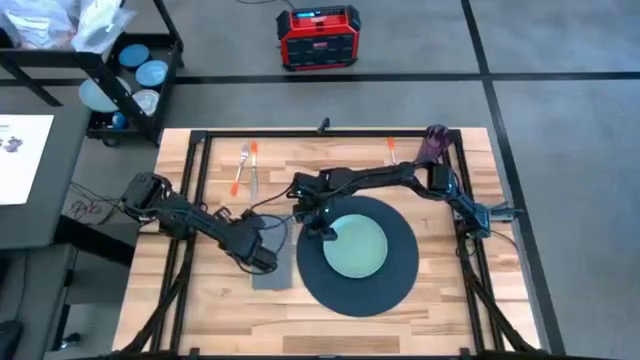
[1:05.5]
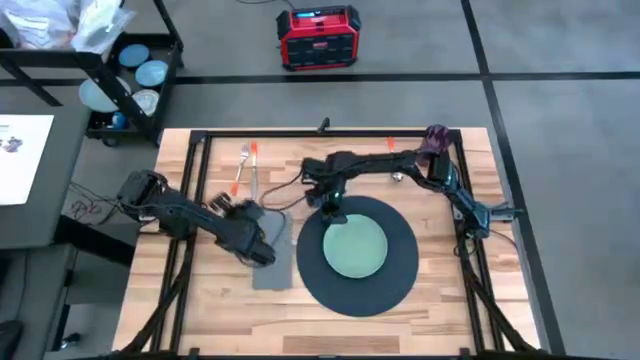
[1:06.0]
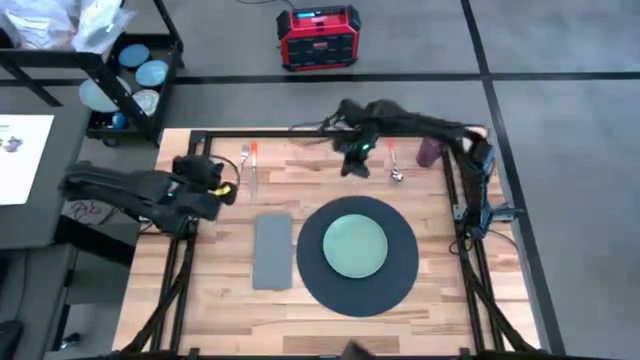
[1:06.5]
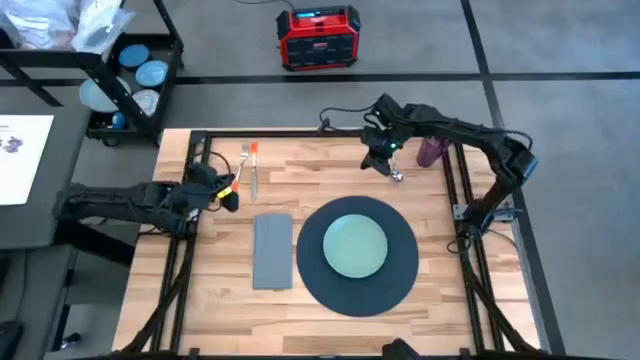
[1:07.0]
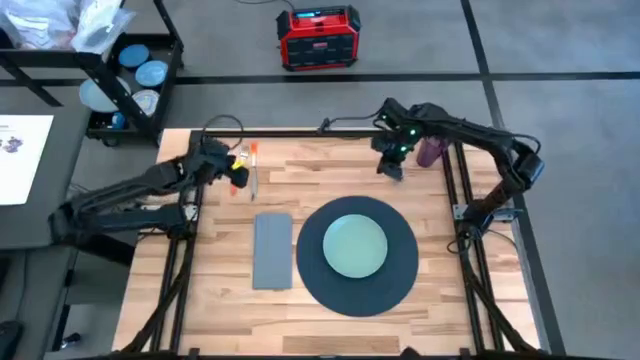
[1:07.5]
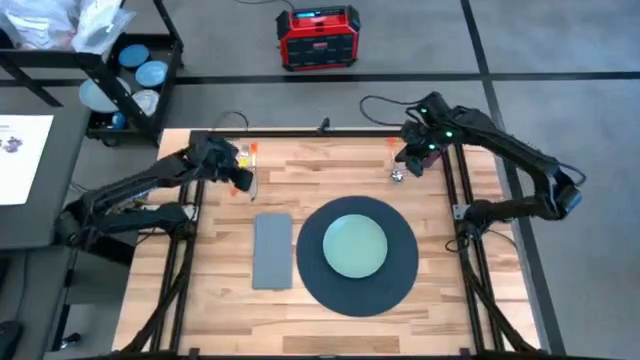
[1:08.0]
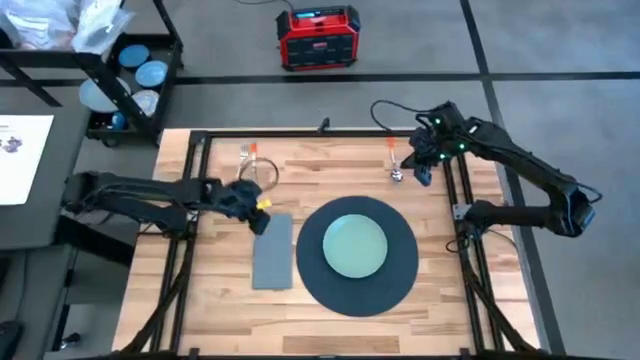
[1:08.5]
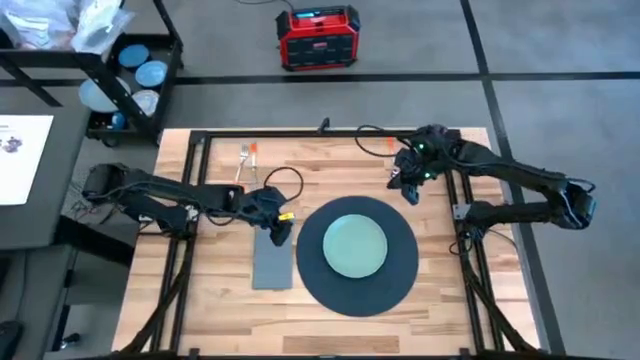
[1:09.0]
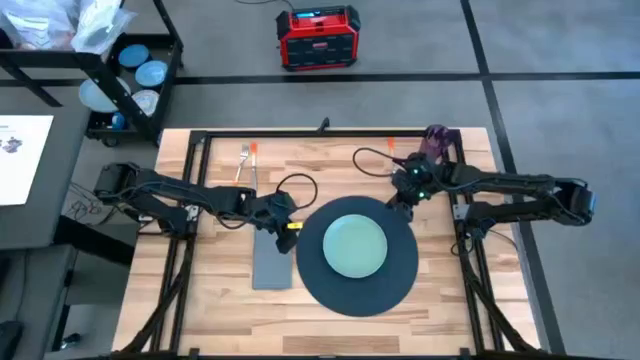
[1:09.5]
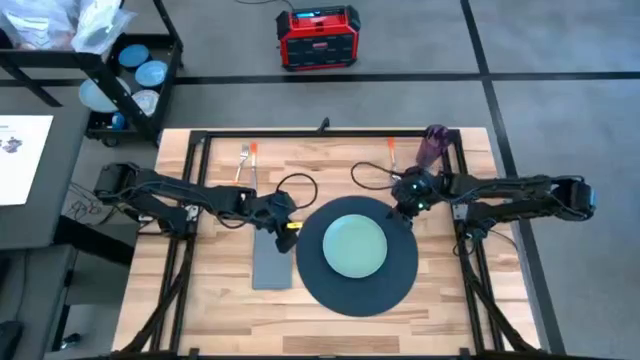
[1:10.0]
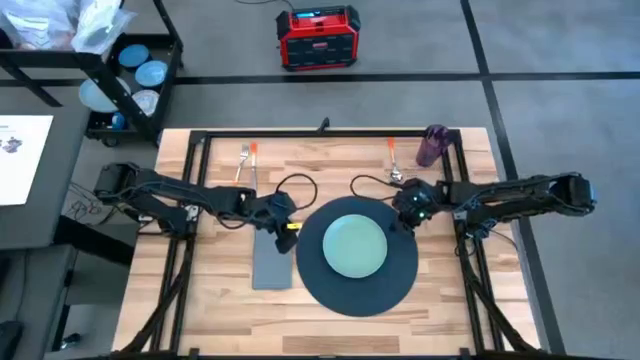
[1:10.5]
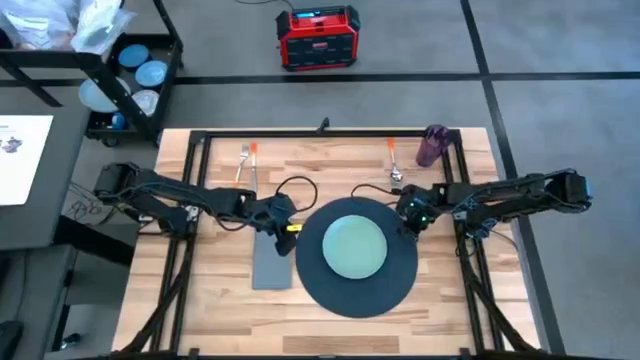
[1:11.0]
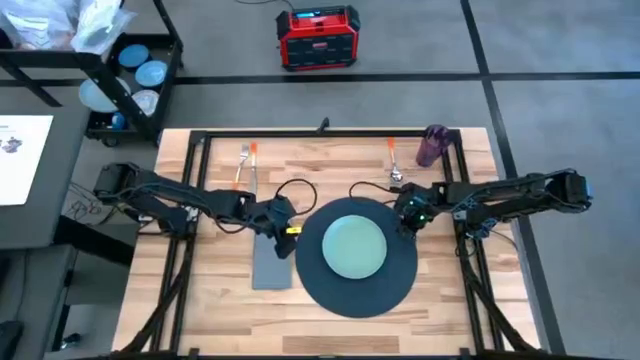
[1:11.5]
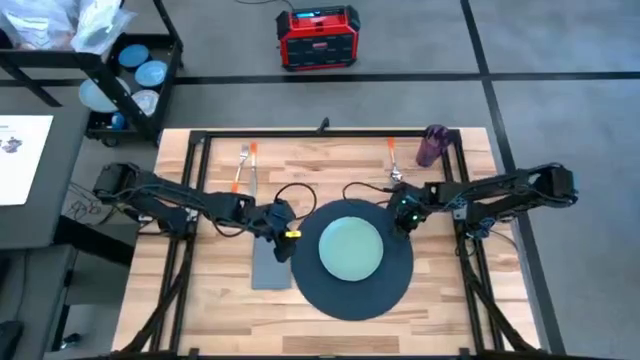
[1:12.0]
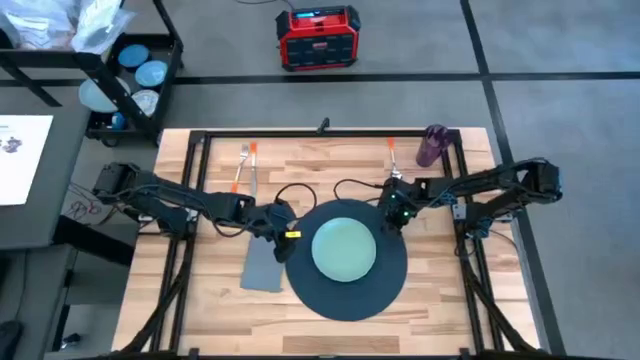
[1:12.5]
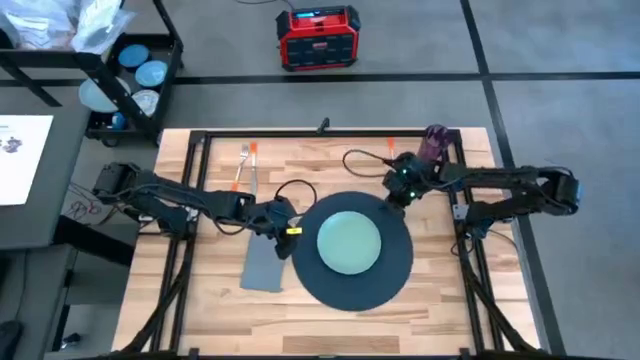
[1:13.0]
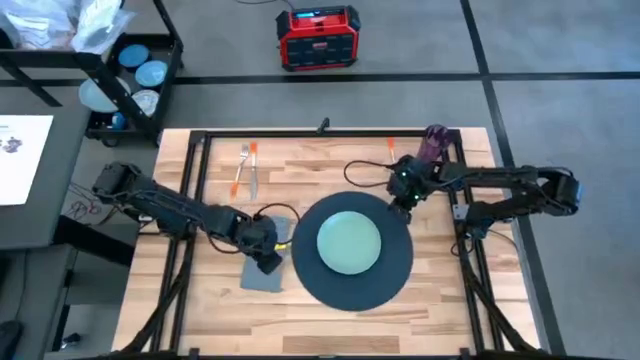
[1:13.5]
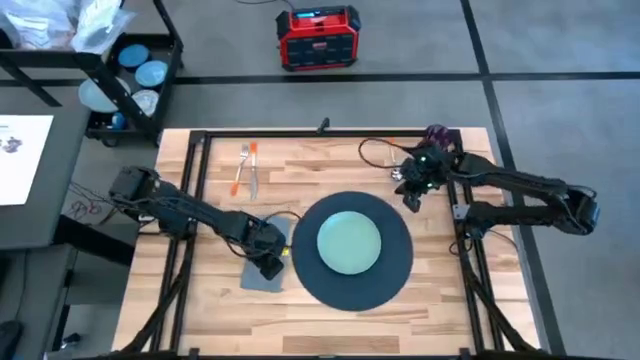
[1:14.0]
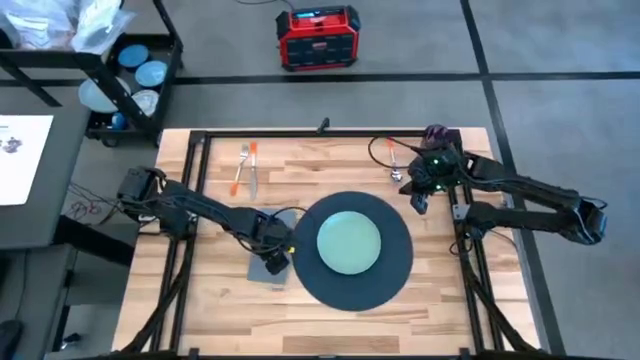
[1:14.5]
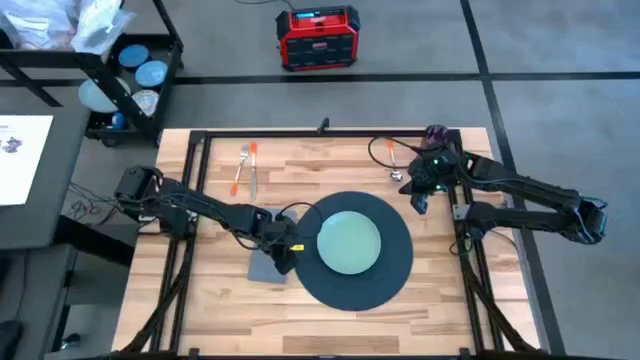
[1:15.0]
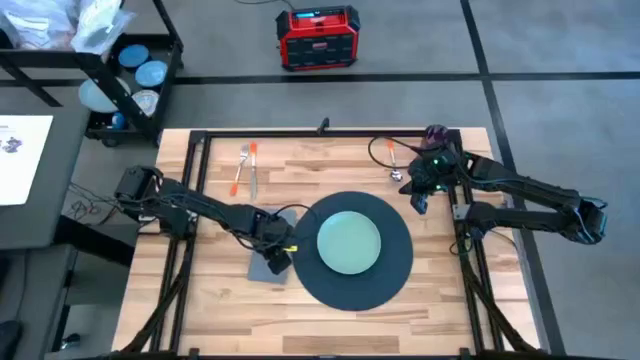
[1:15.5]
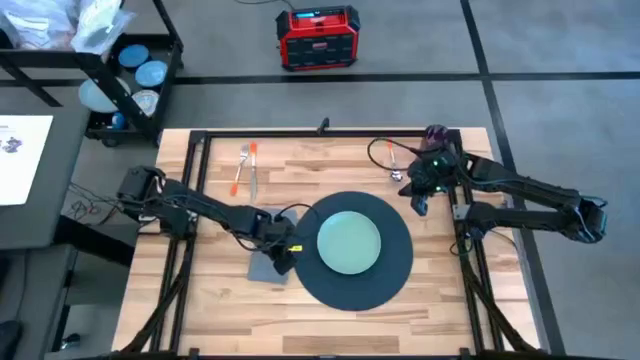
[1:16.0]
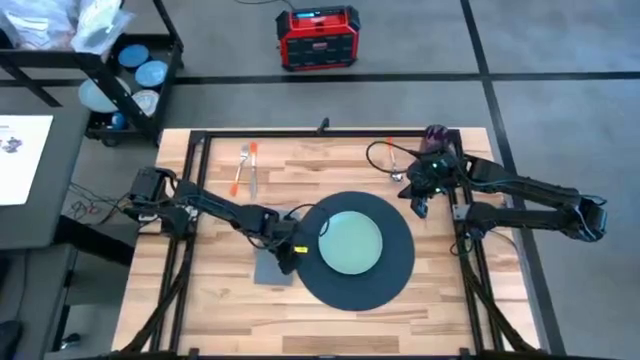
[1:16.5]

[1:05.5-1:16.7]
Task: Set table place
Adjust the gray napkin and blue placemat to the center

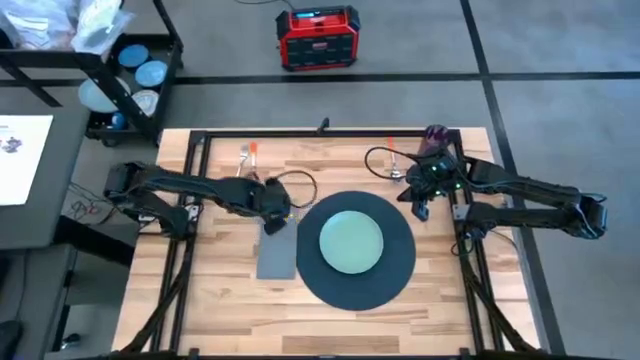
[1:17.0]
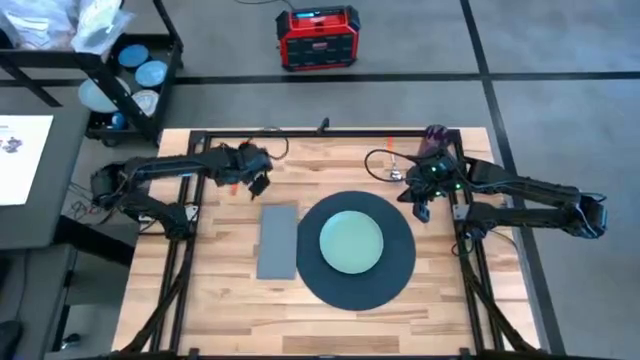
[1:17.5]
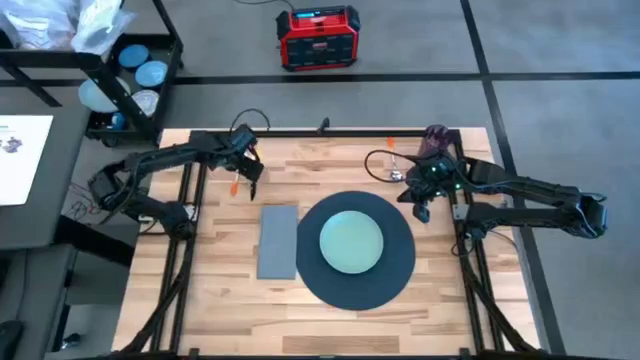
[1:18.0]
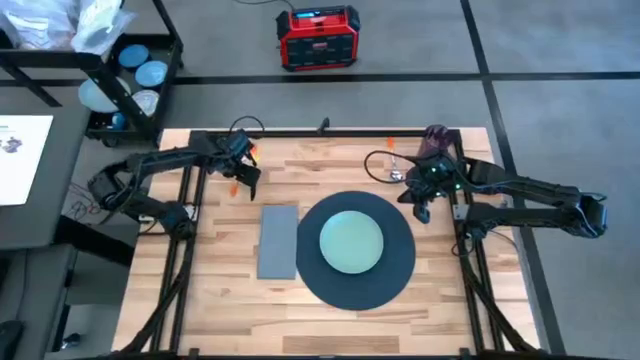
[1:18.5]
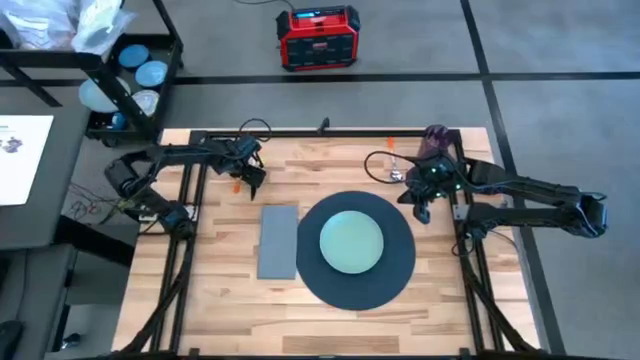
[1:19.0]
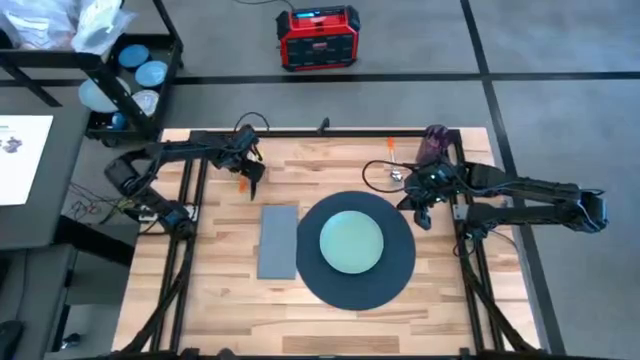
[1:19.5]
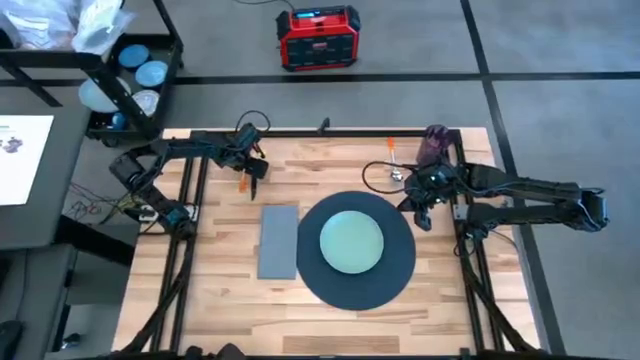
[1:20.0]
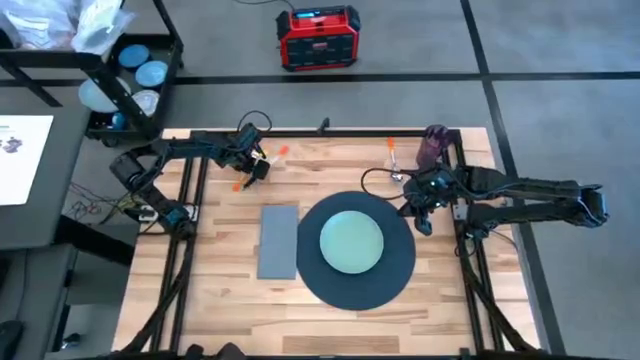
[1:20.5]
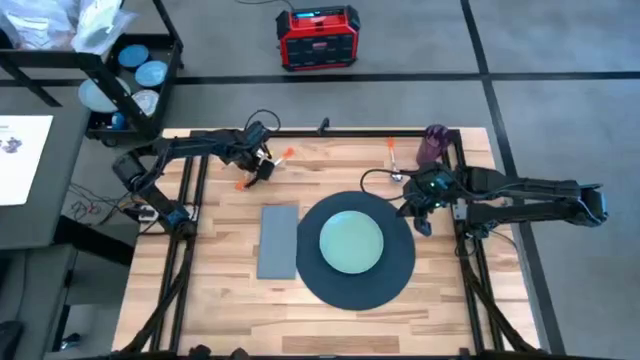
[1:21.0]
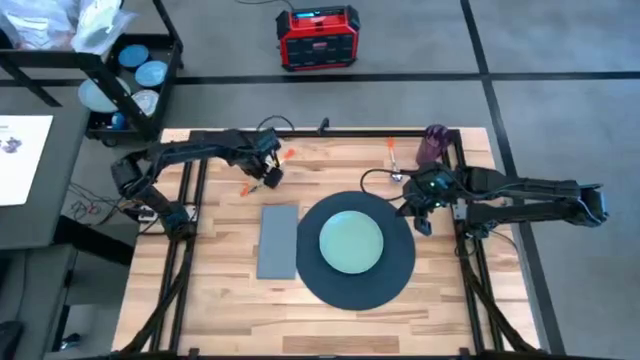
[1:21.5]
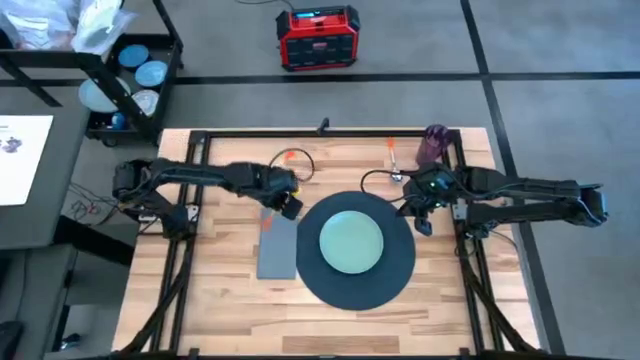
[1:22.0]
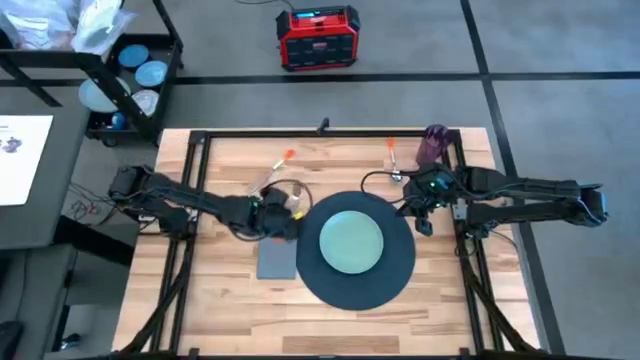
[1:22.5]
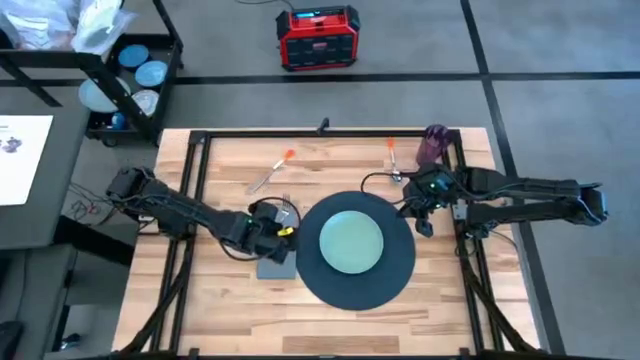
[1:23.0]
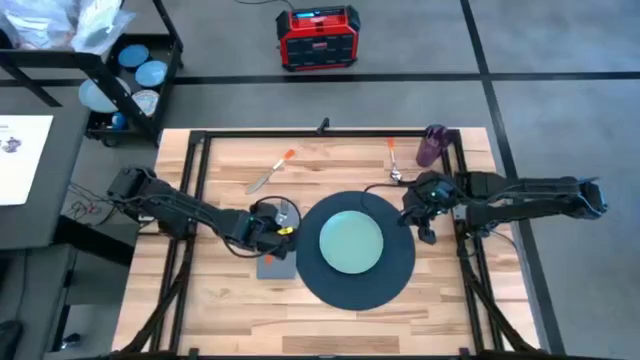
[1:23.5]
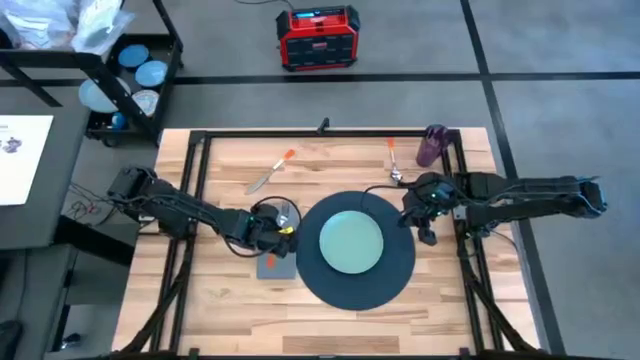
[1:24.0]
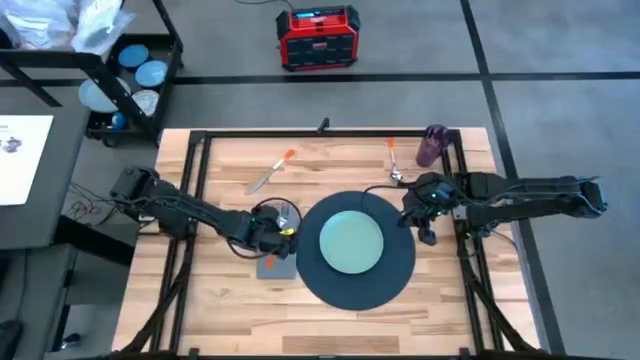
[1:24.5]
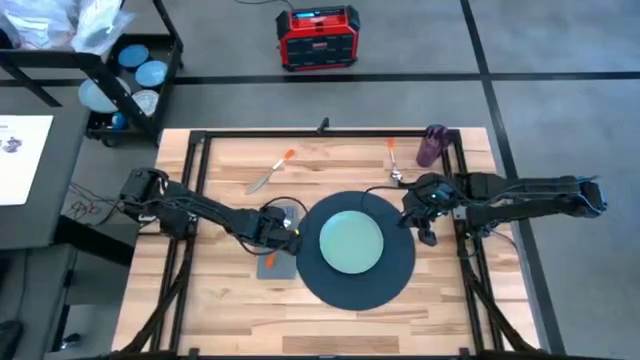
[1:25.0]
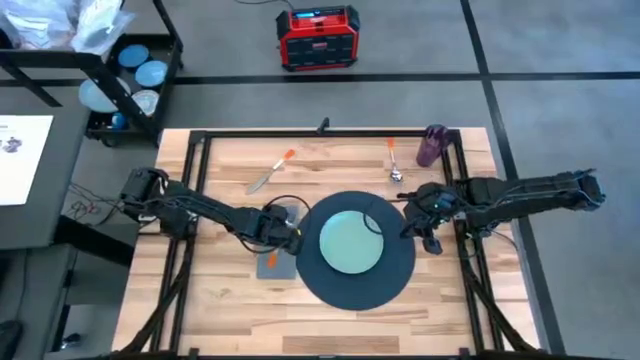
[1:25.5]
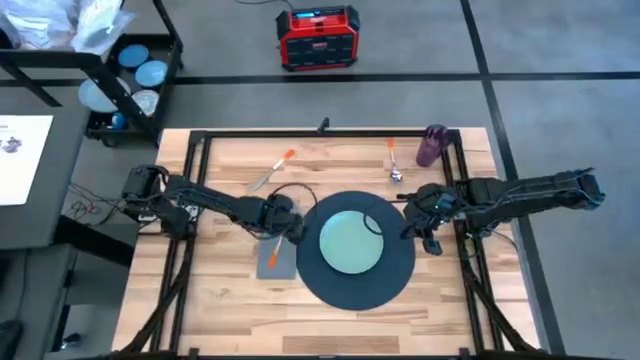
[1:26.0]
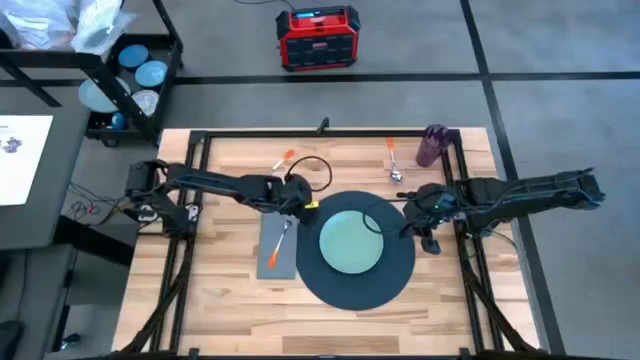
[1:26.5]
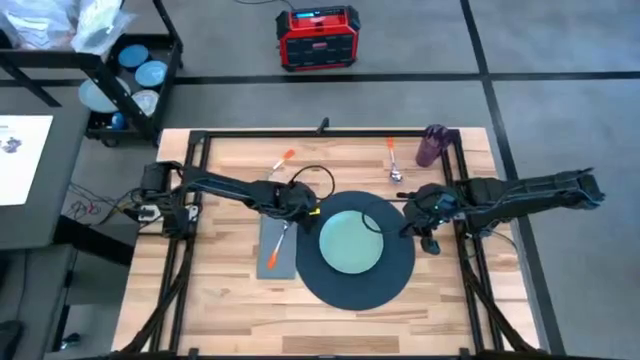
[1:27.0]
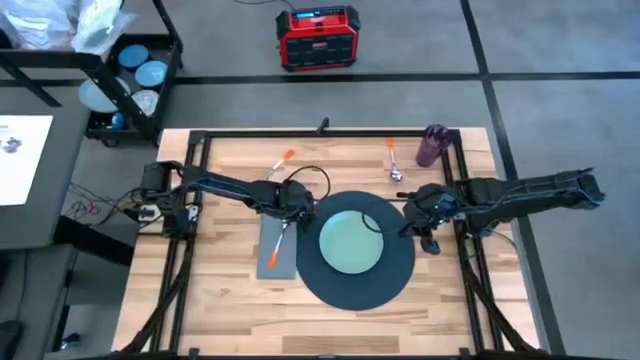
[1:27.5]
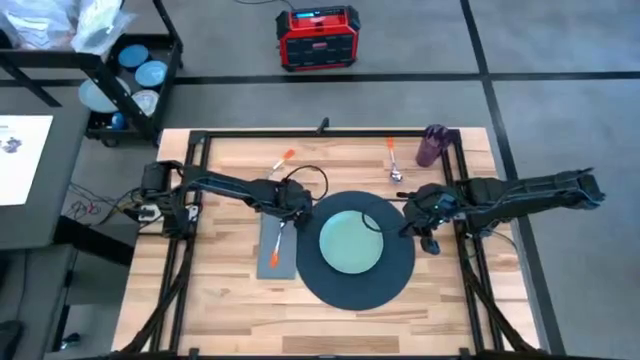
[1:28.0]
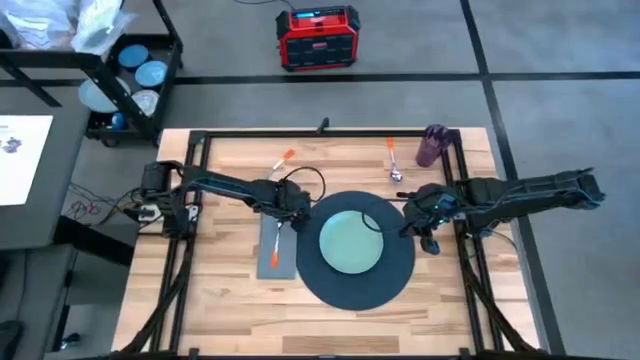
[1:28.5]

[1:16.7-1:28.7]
Put the orange fork on the gray napkin
